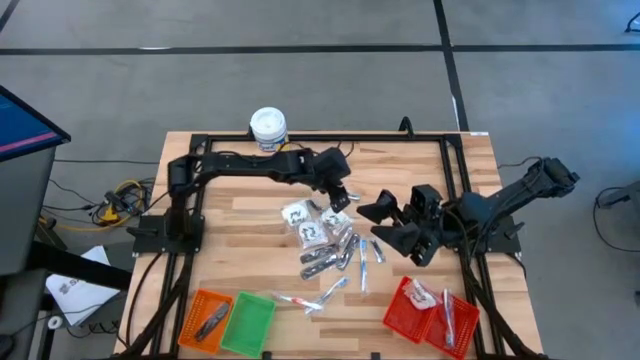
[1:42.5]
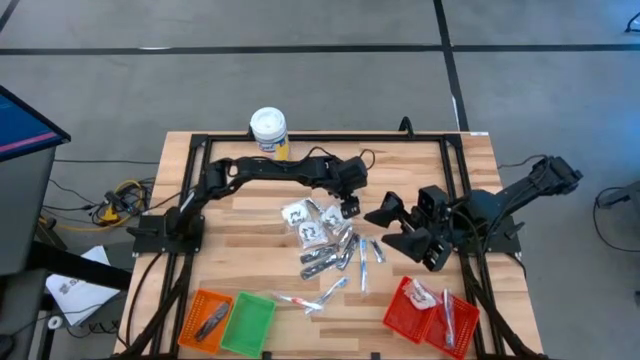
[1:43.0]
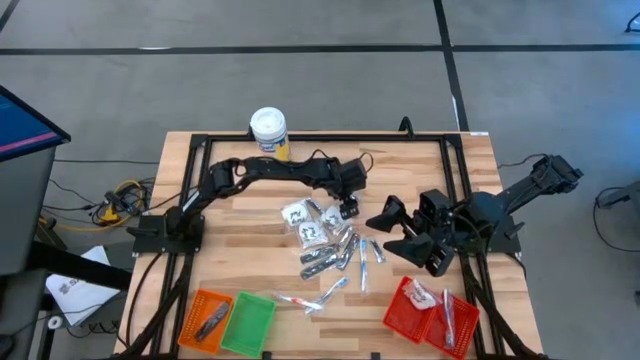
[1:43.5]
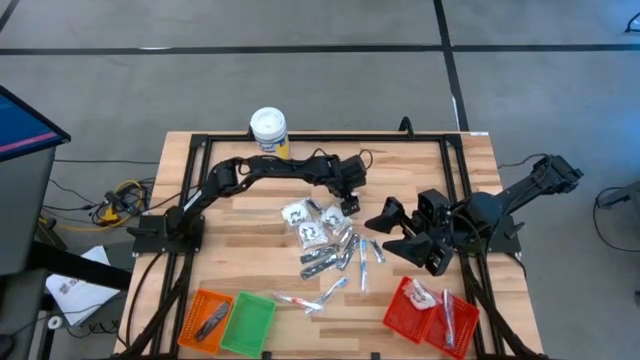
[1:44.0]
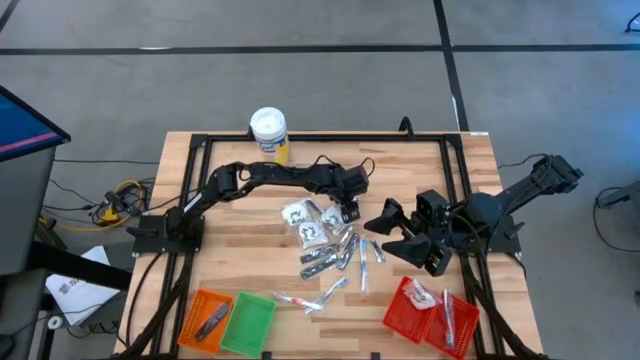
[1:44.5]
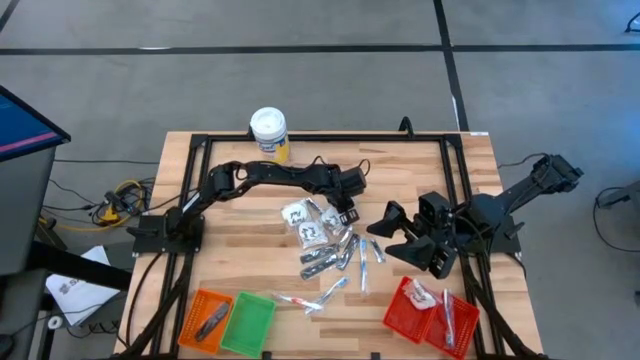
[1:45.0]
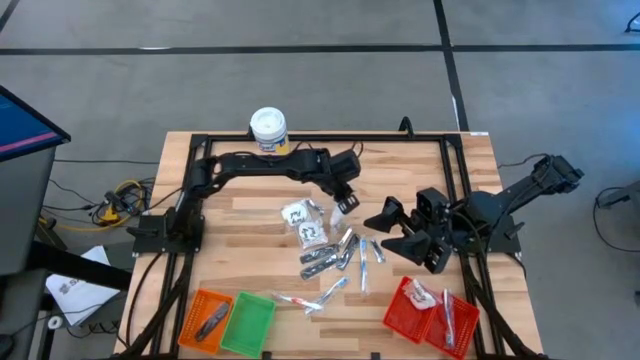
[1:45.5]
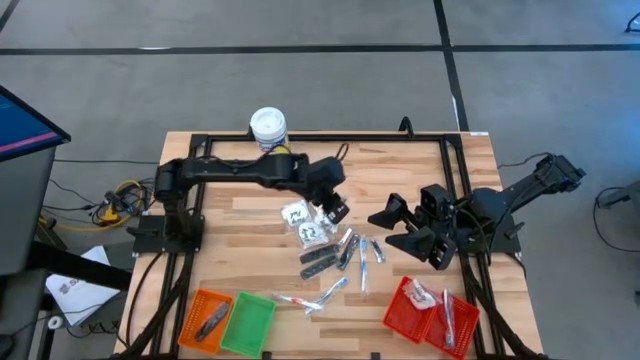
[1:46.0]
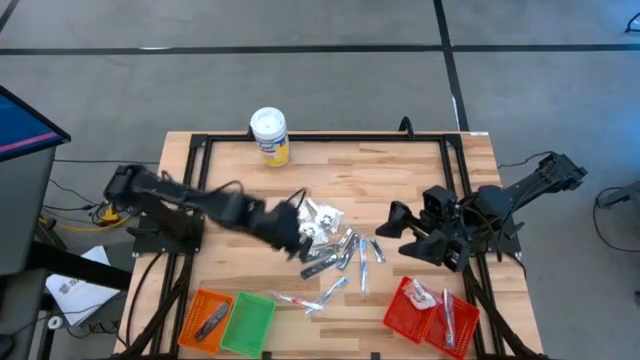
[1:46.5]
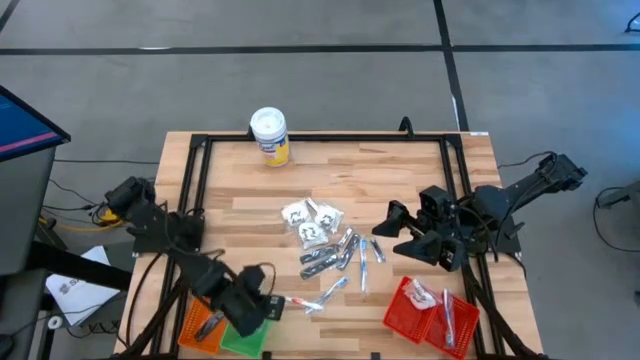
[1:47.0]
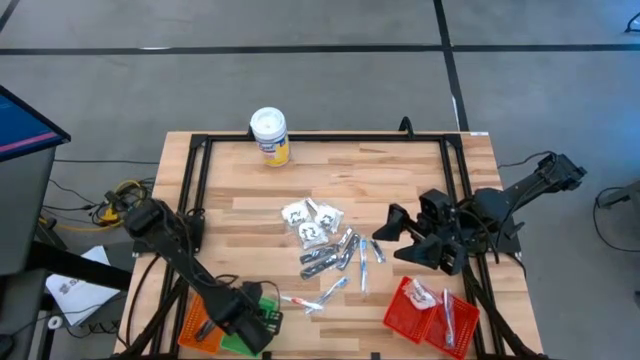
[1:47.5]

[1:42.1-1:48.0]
Task: Pick & Place Travel size toiletries
Put the nail cutter into the green basket

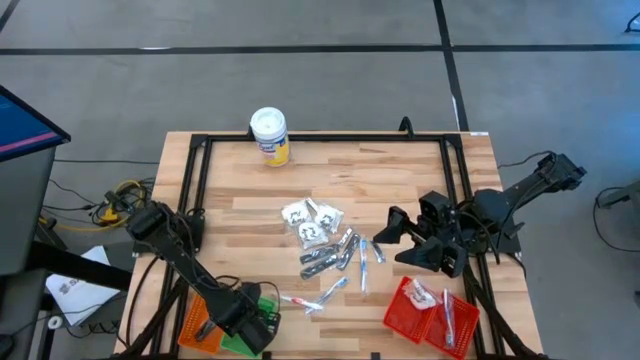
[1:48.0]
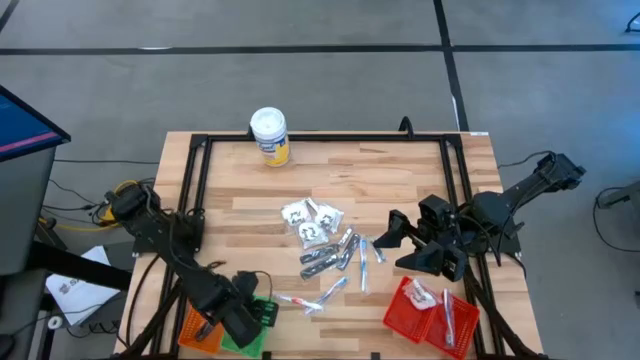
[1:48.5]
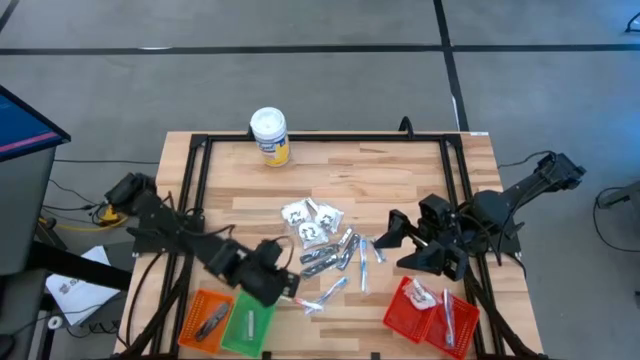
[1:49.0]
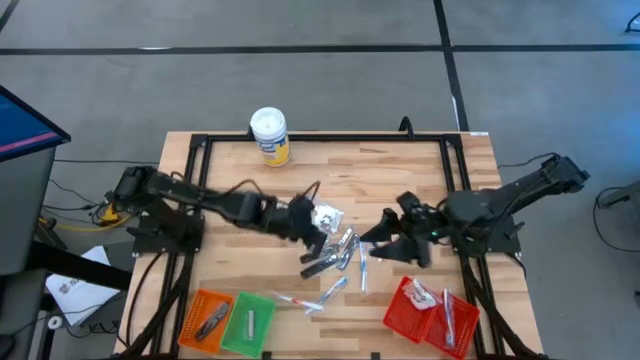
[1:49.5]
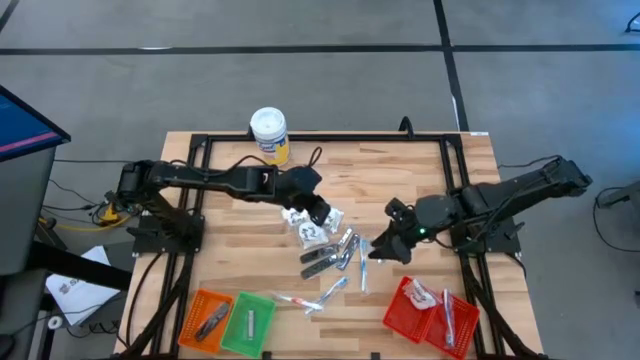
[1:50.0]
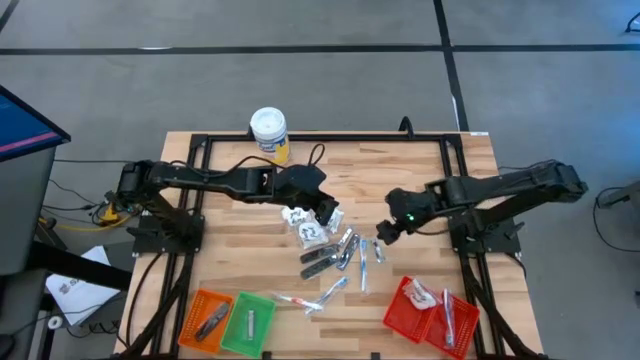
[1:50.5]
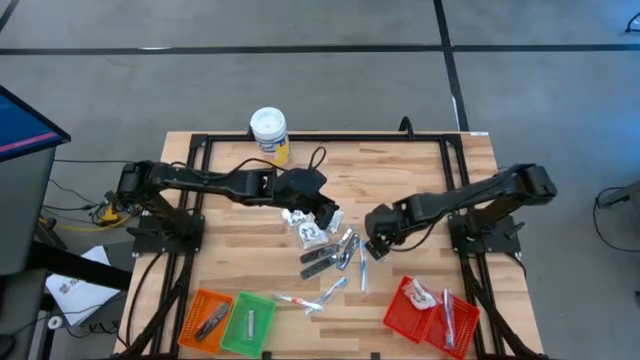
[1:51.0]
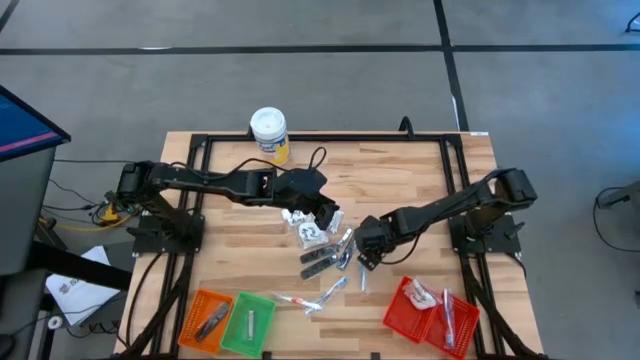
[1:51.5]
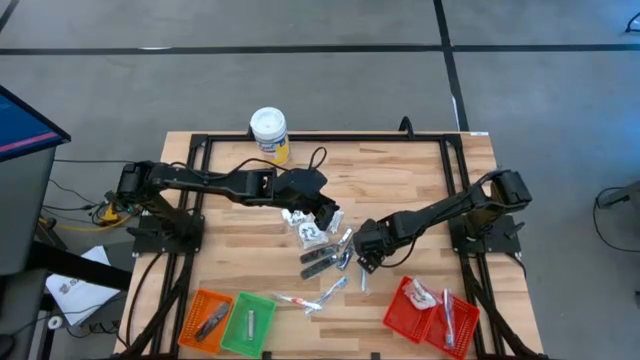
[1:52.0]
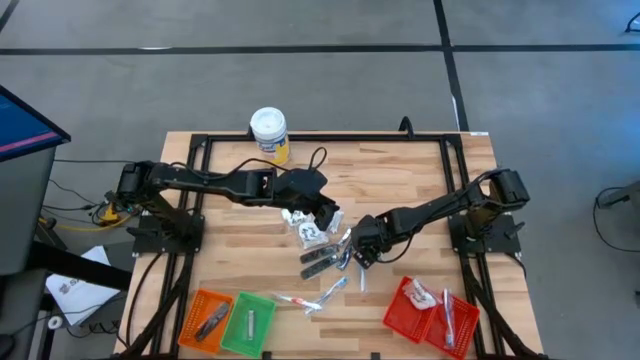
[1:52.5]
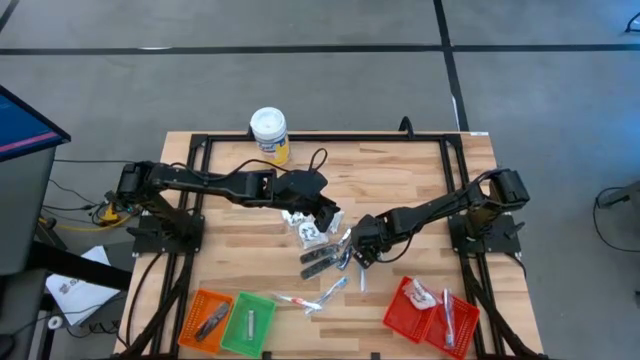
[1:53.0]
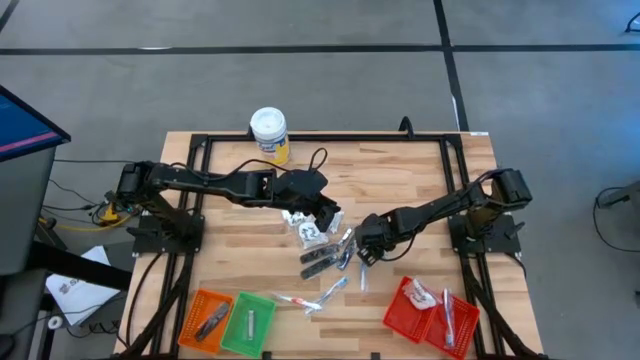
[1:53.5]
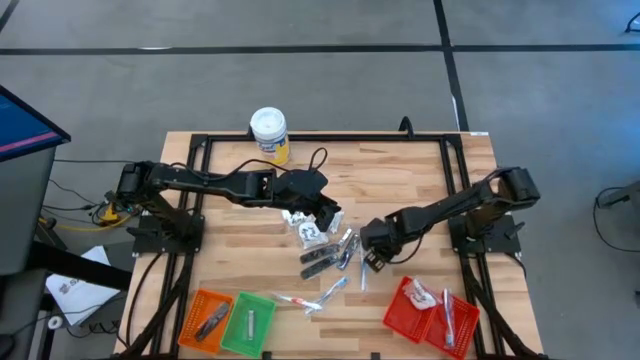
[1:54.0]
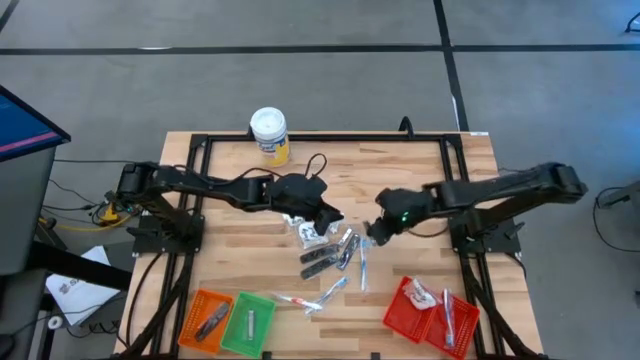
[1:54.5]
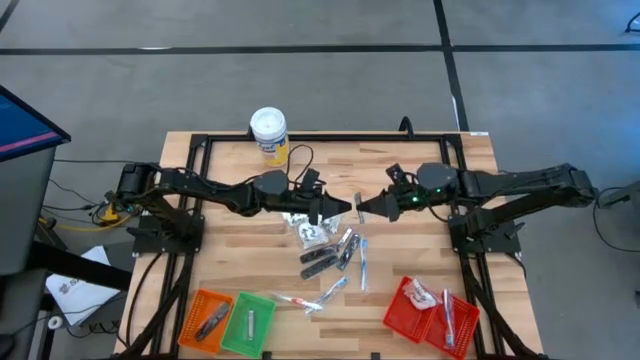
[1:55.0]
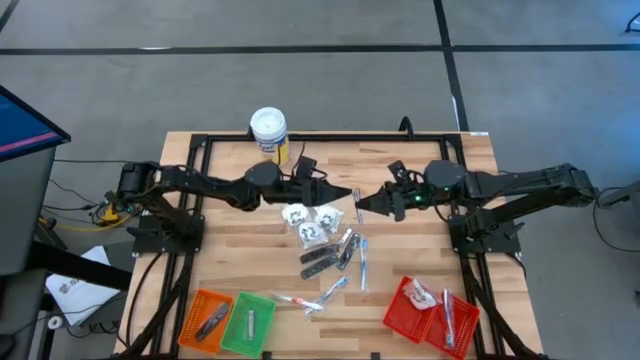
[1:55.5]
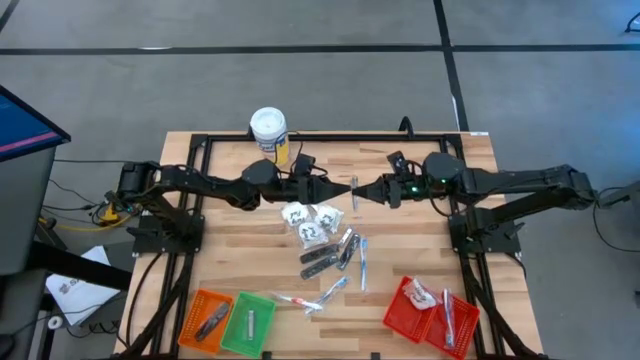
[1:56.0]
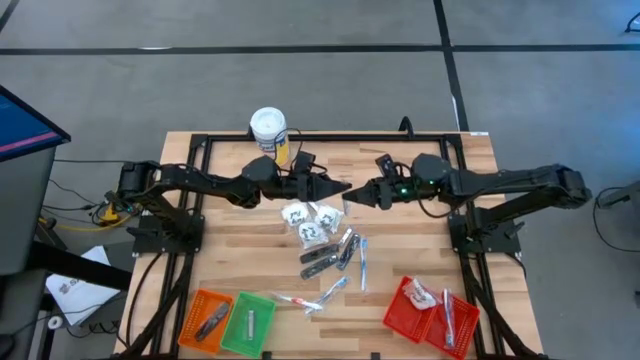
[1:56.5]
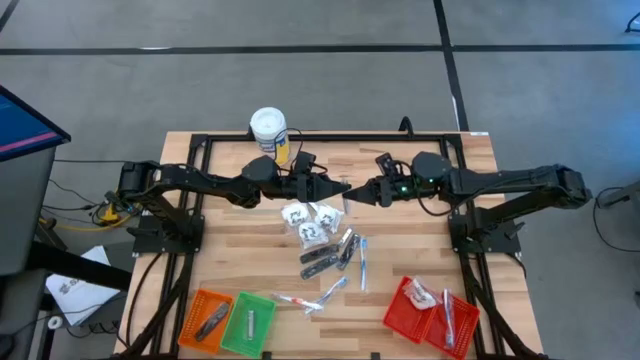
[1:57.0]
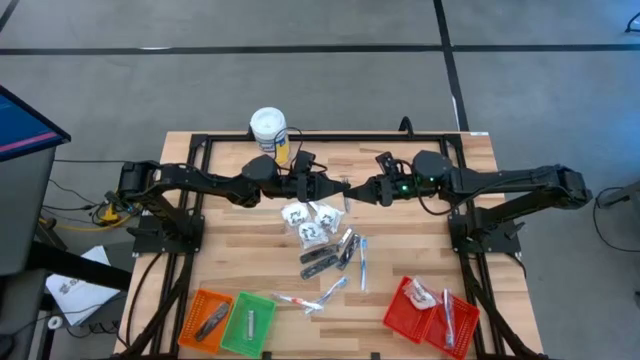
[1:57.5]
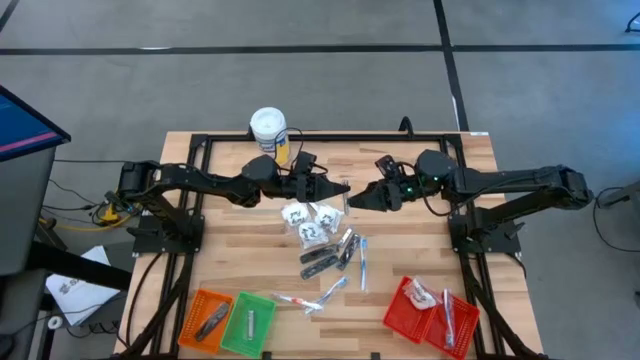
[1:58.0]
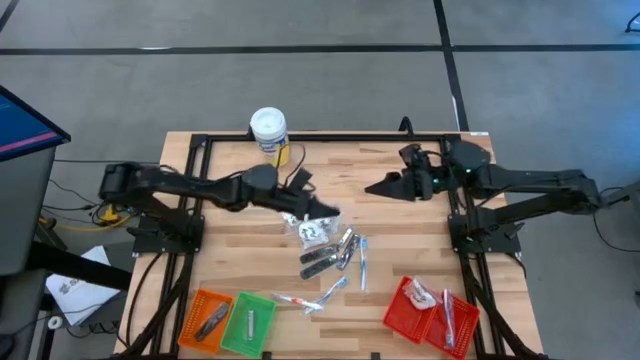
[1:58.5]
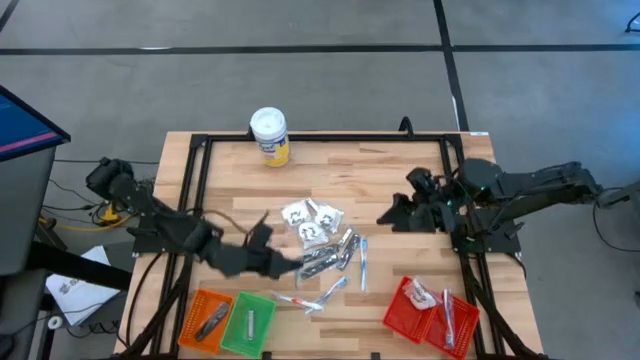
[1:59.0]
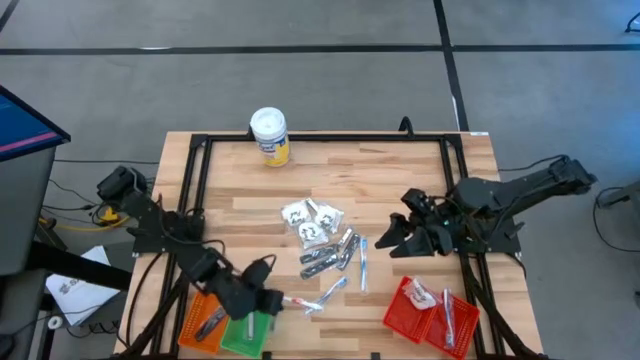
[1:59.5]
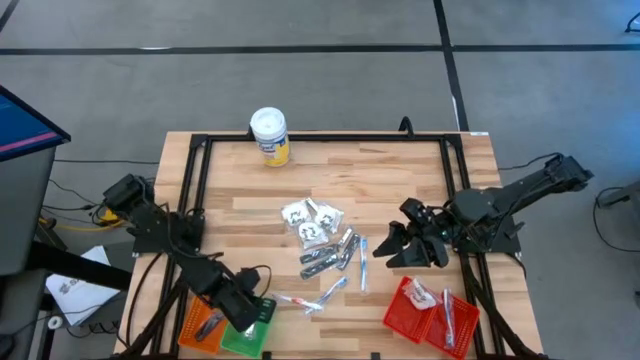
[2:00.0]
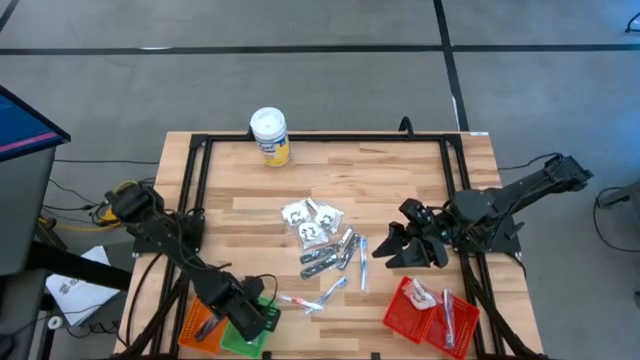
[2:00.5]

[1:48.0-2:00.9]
Put the nail cutter into the green basket

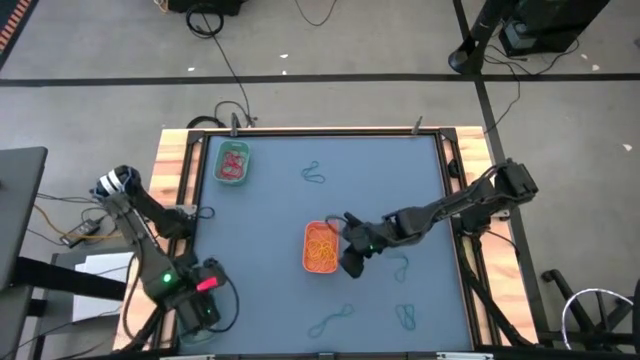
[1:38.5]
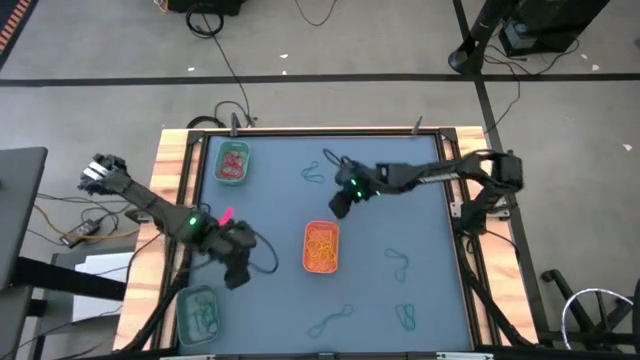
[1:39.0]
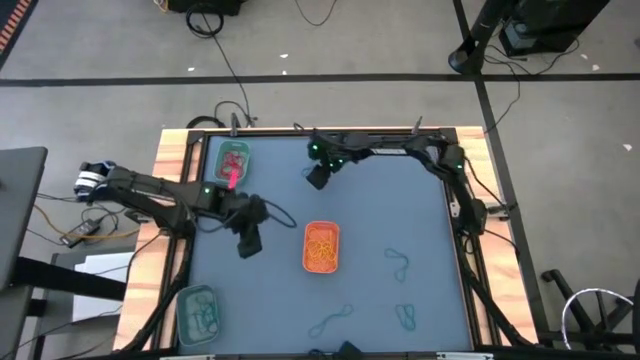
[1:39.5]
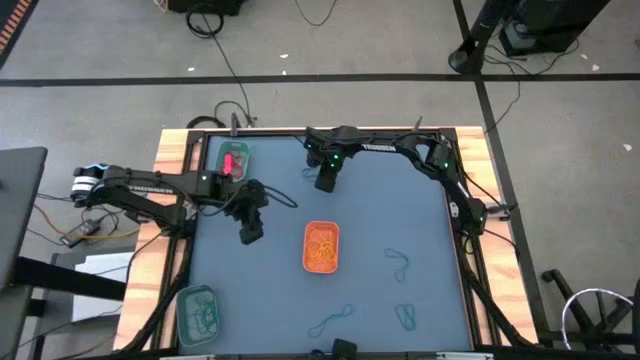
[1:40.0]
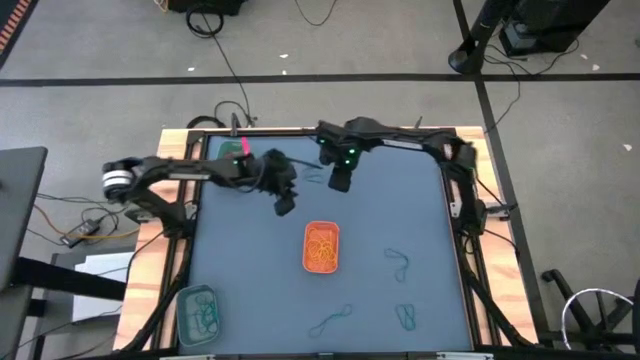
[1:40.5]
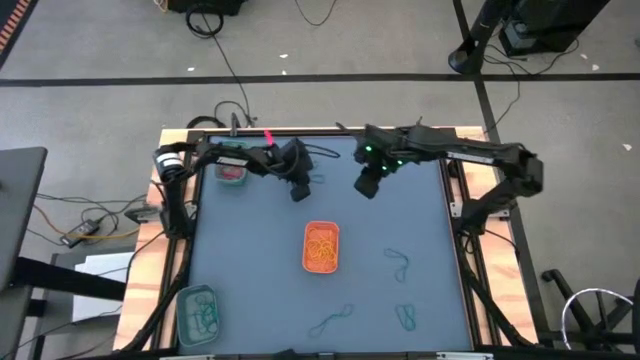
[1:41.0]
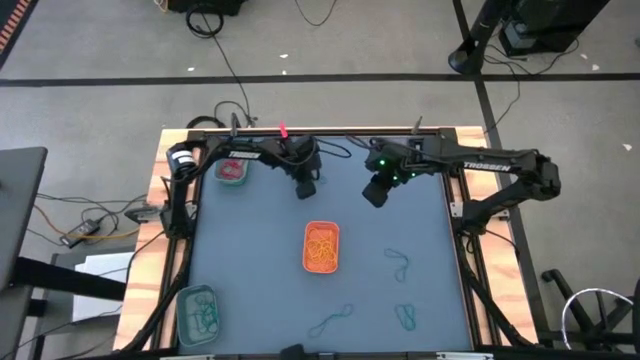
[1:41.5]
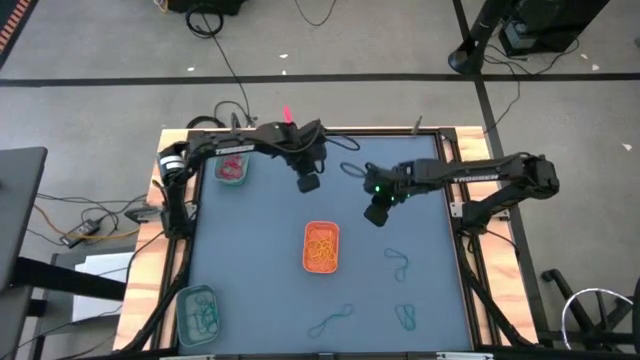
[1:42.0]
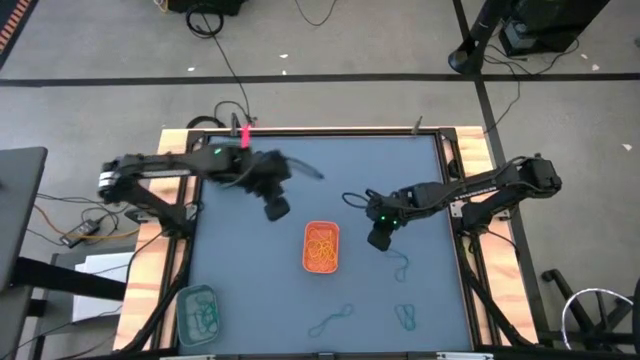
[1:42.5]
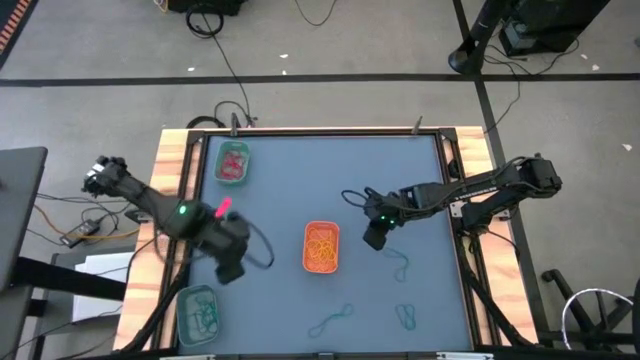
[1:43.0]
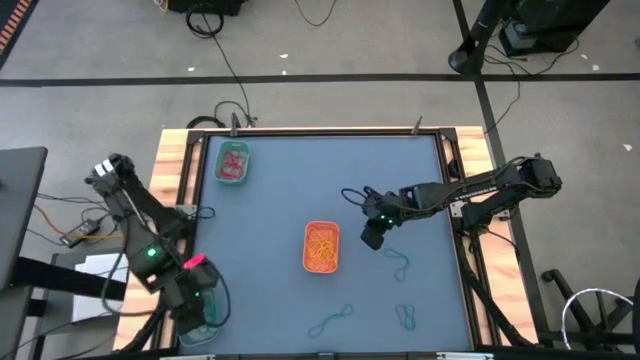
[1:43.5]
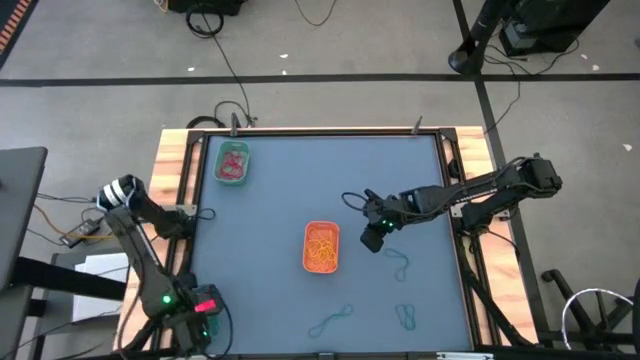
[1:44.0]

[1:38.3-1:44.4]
Task: Sort rubber bands into baskets
Put the blue rubber band into the blue bin
